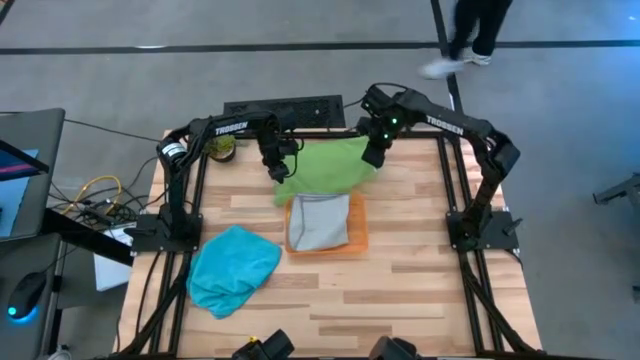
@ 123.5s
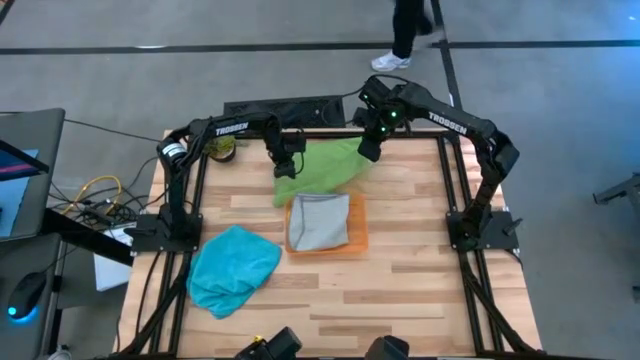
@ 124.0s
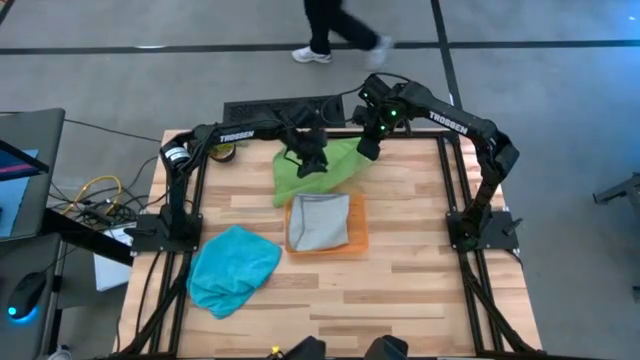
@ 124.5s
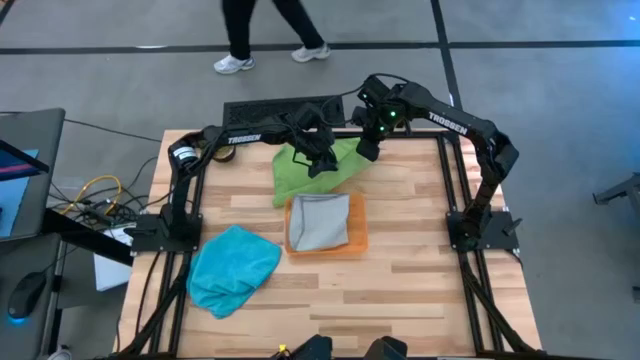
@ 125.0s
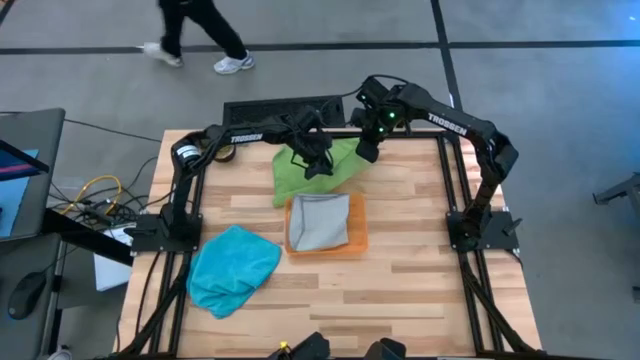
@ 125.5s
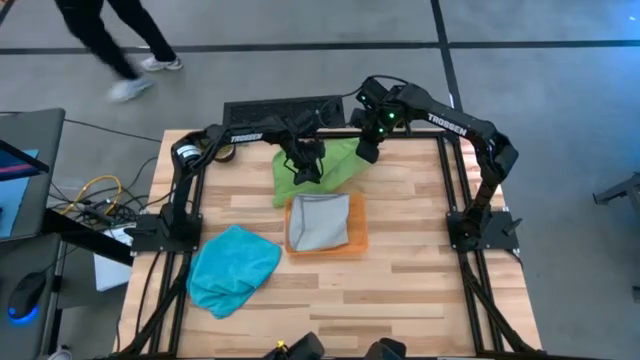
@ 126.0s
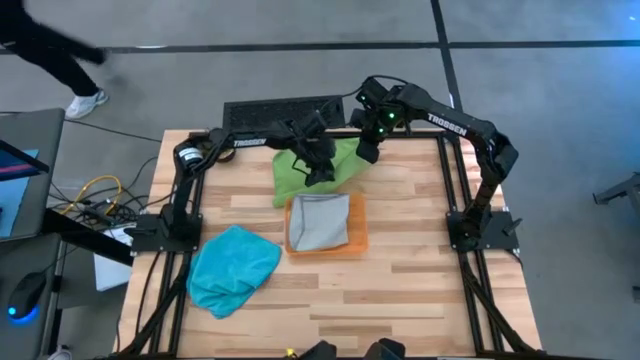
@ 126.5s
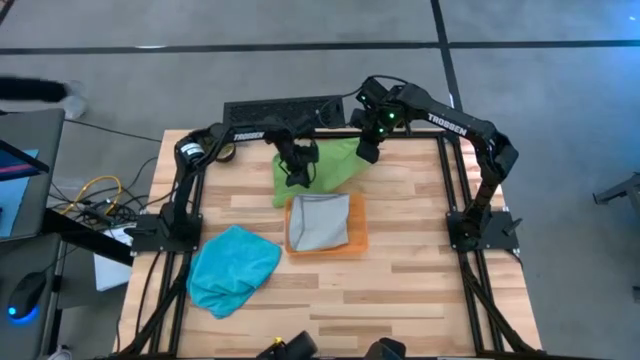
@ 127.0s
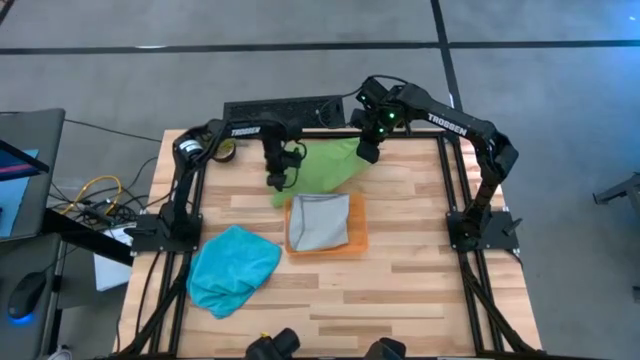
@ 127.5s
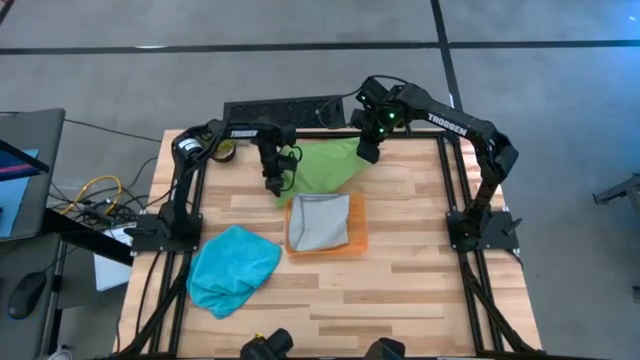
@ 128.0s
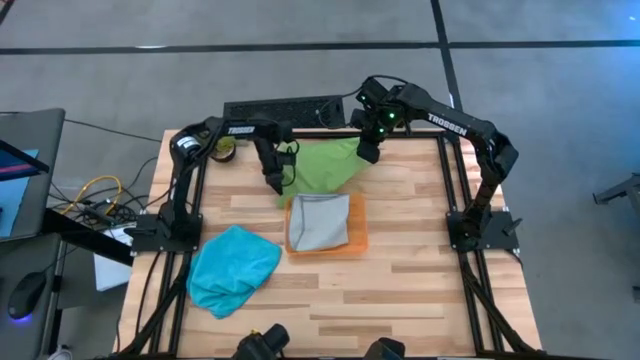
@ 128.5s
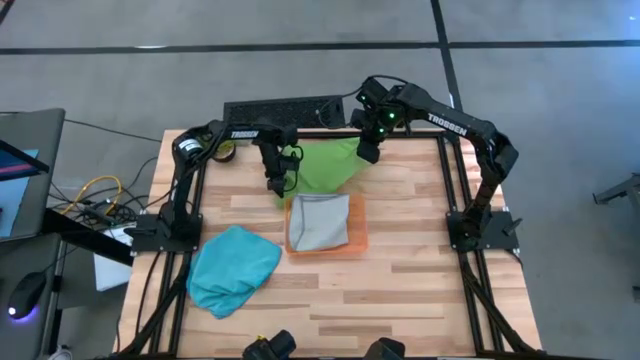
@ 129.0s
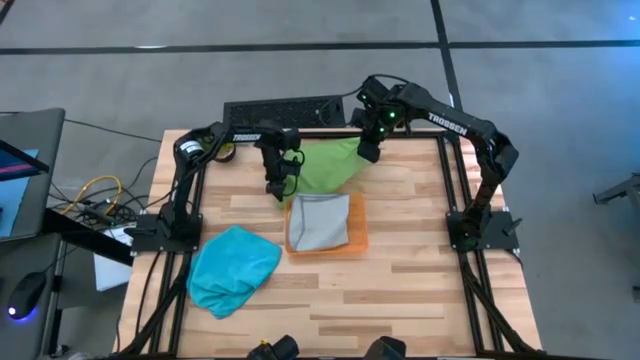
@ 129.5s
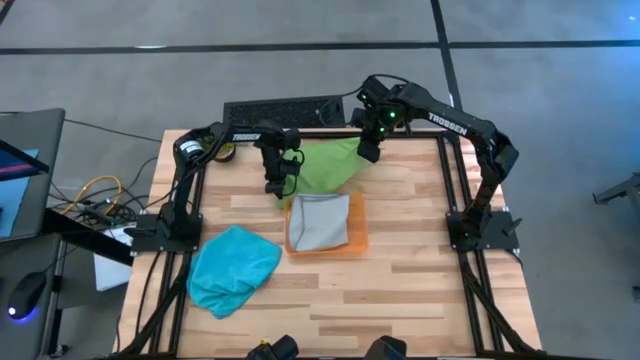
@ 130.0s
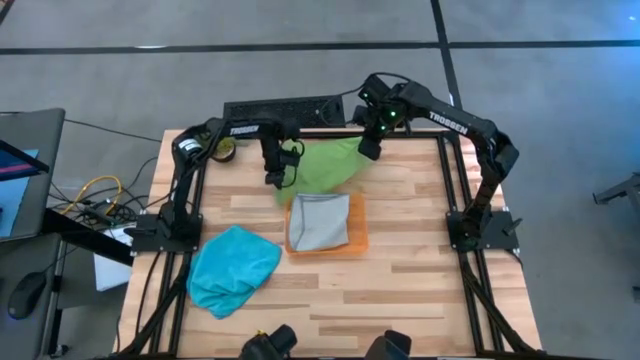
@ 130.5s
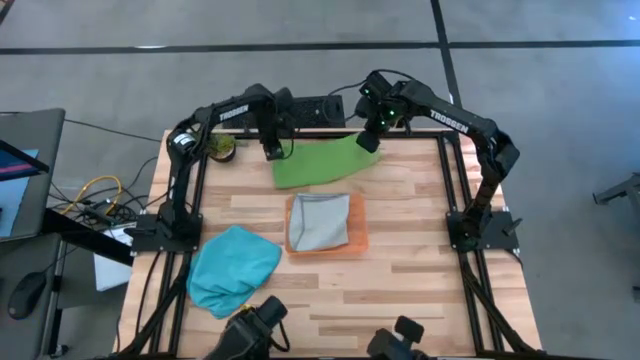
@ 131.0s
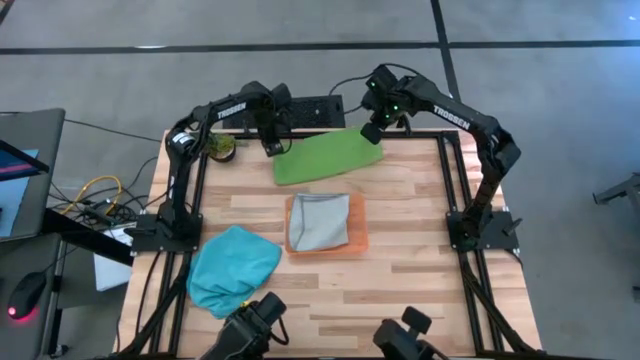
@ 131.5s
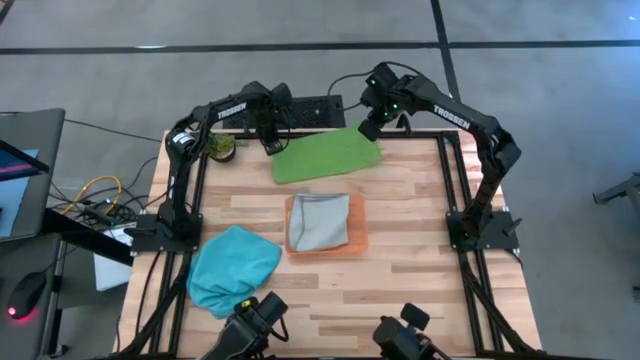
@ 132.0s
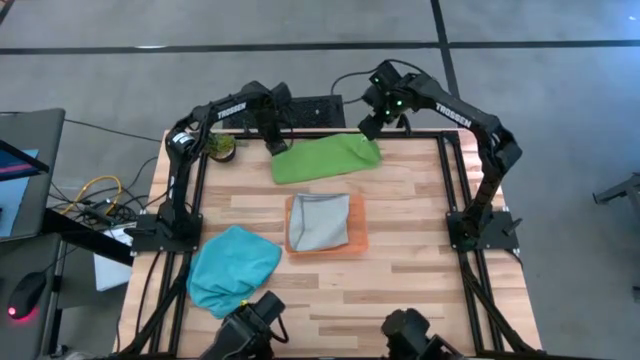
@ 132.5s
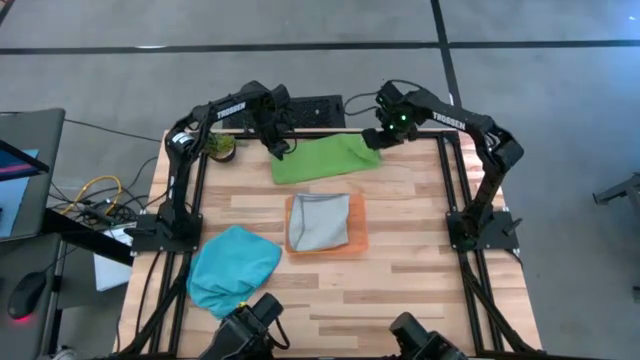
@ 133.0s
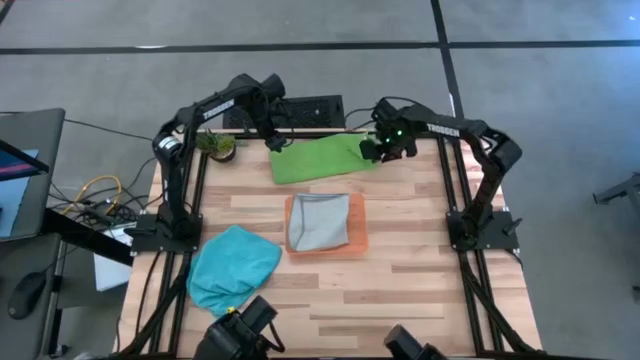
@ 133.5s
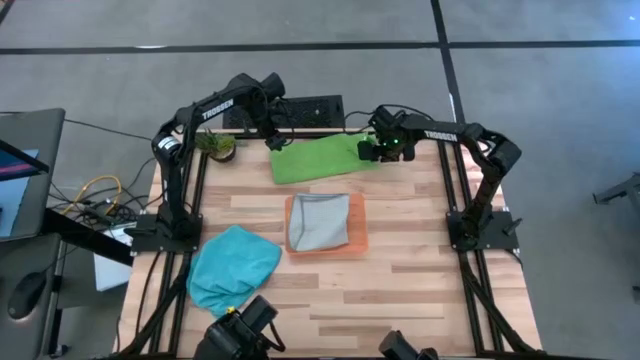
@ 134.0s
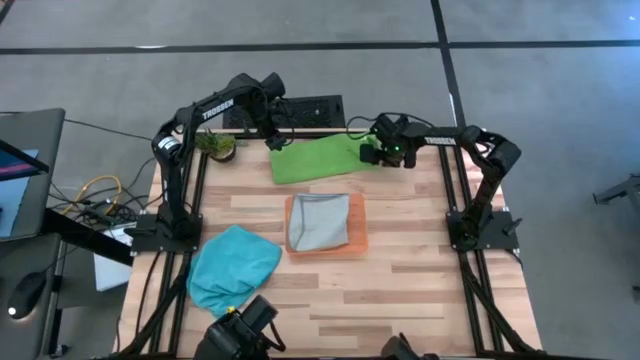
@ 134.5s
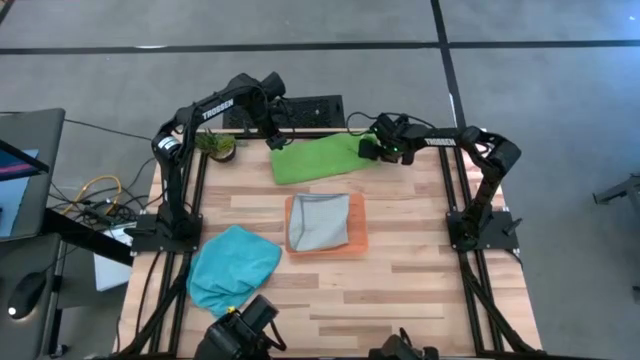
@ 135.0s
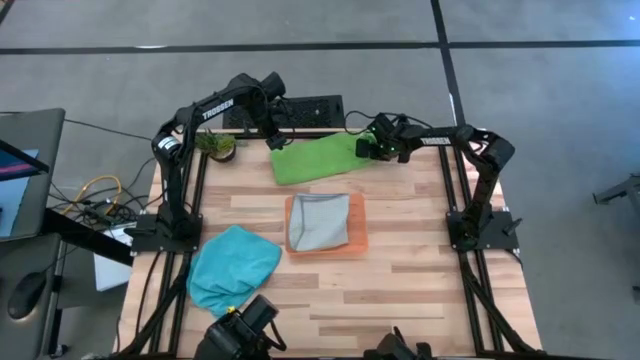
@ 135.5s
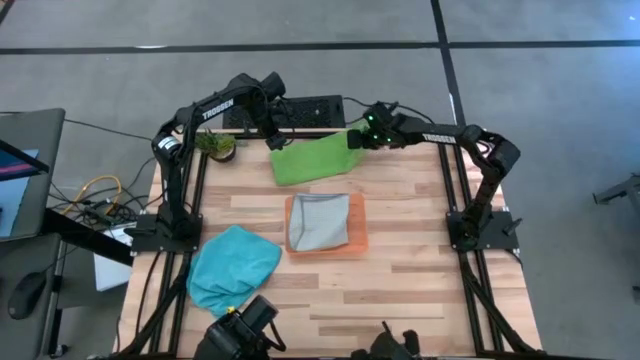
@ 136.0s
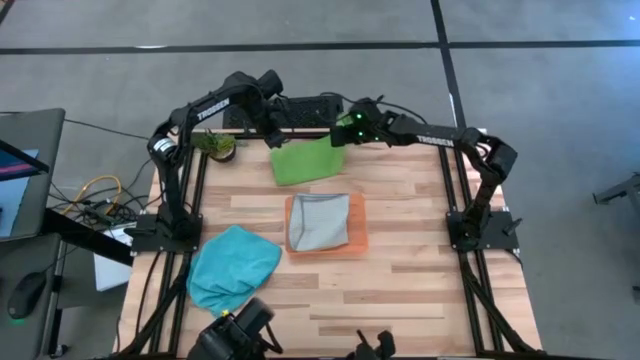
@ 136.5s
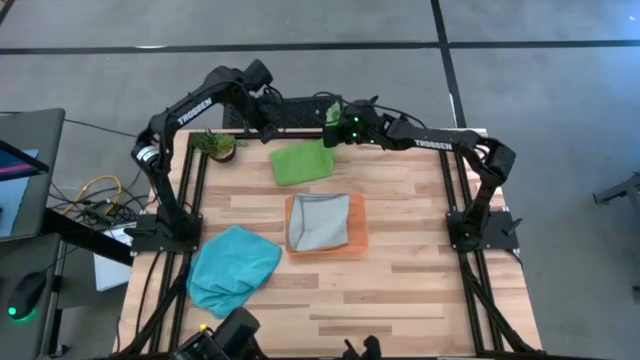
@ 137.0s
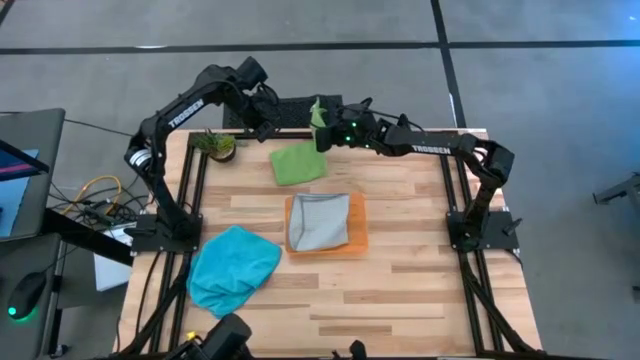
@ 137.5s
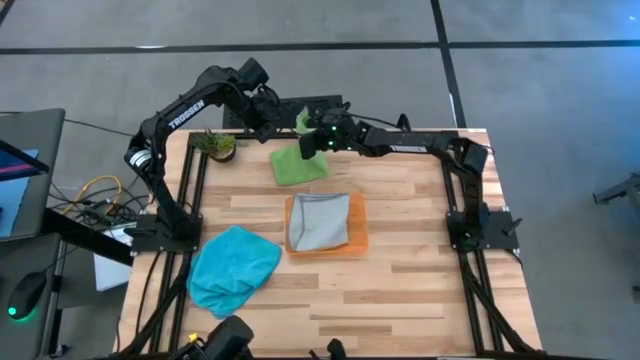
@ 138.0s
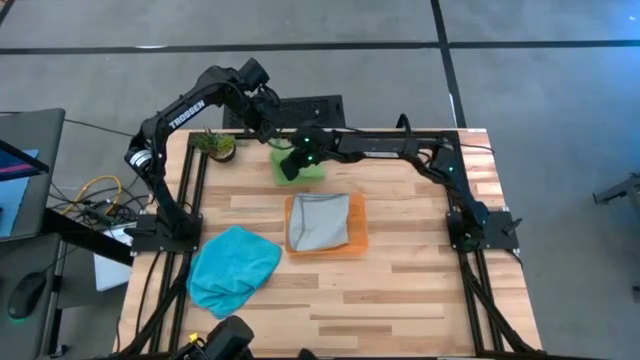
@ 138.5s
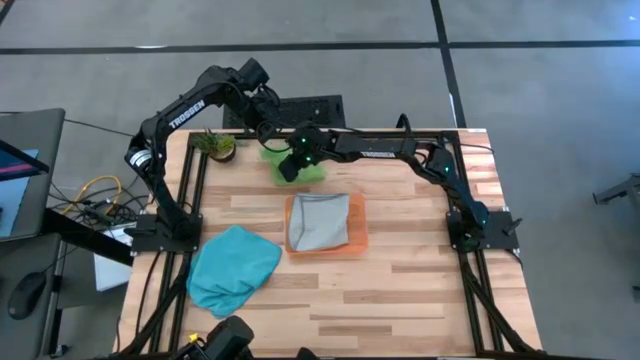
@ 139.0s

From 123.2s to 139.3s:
Task: Sort microfiber towel by color & place in baskets
Fold the green towel

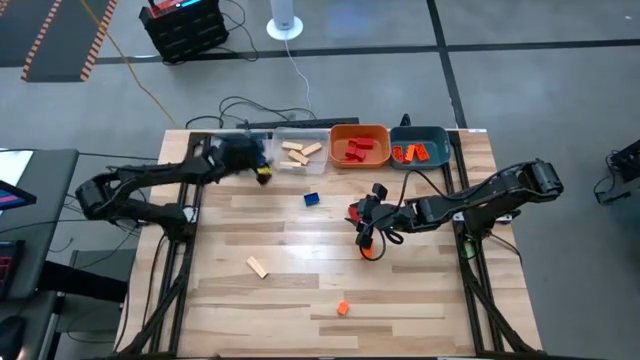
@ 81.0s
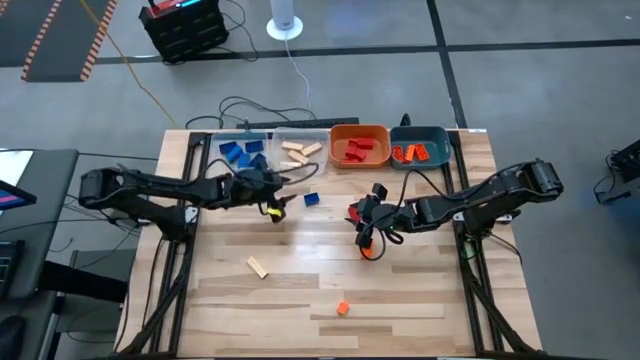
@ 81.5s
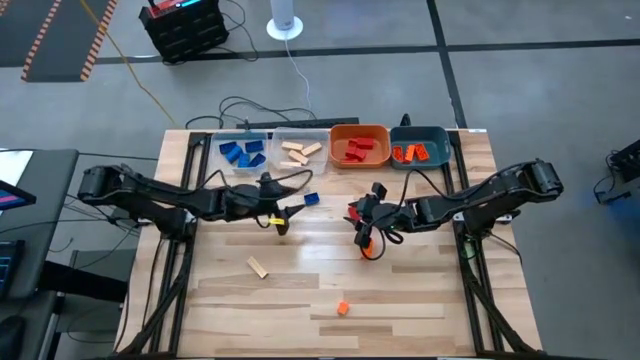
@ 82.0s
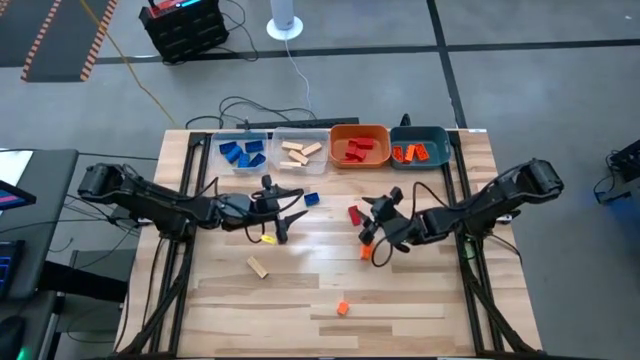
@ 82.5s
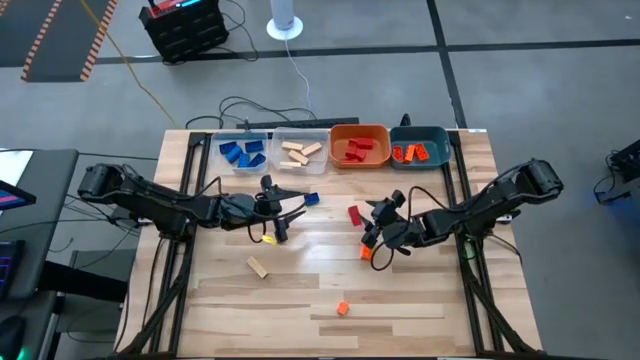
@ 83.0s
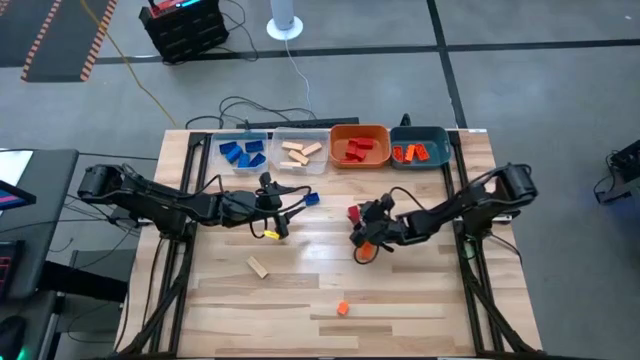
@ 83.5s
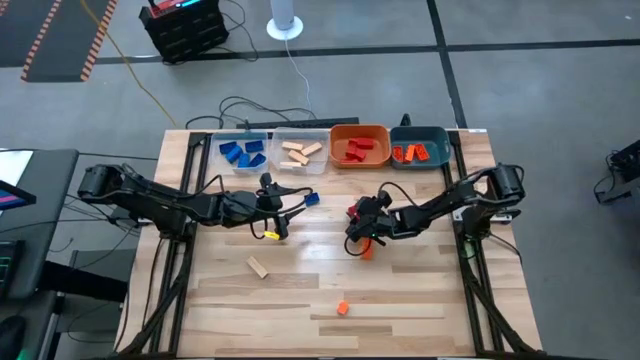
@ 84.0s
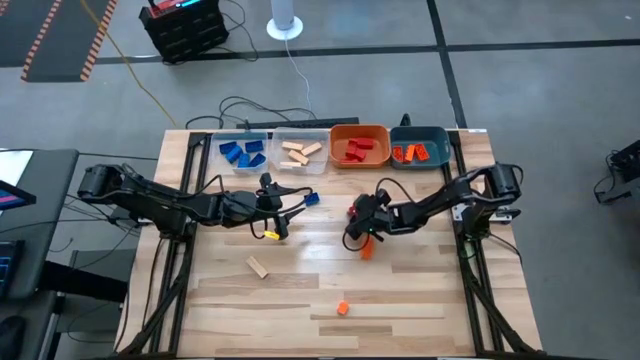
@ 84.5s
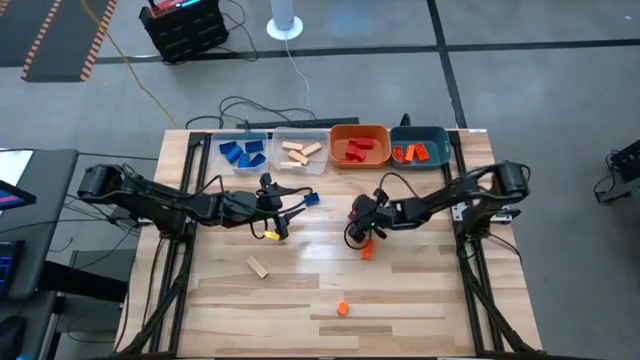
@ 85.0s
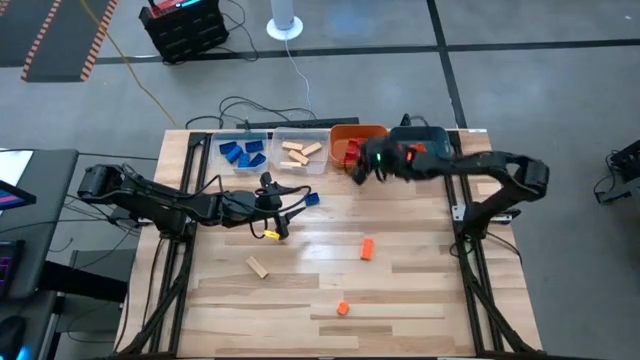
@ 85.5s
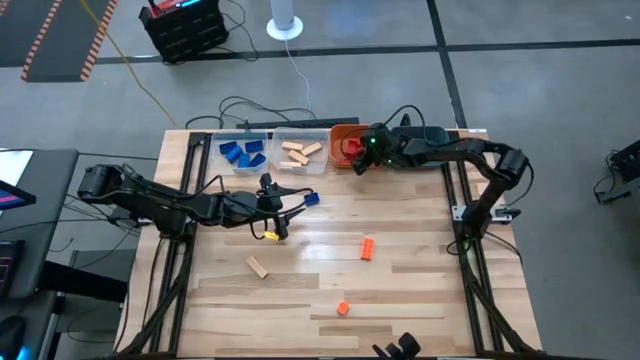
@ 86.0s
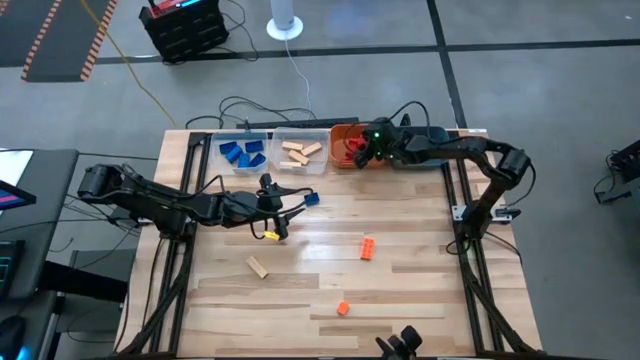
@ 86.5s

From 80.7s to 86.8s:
Task: Sort blocks
Put the red block into the orange bin
